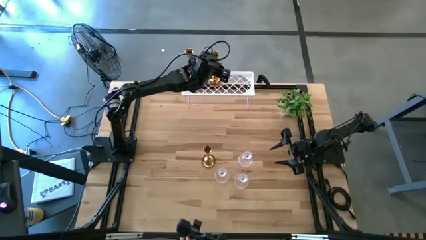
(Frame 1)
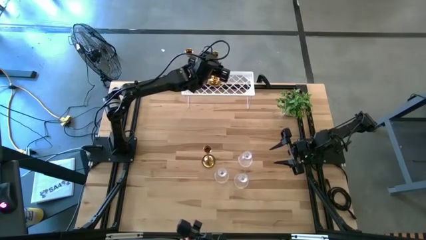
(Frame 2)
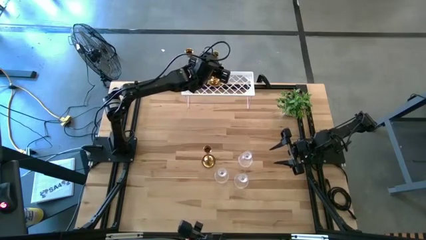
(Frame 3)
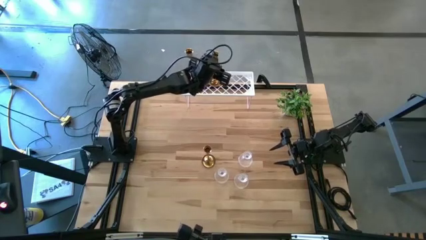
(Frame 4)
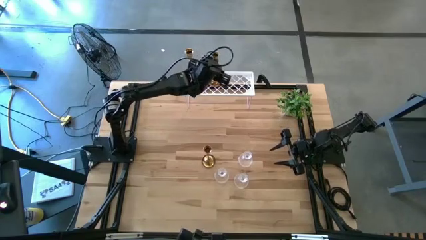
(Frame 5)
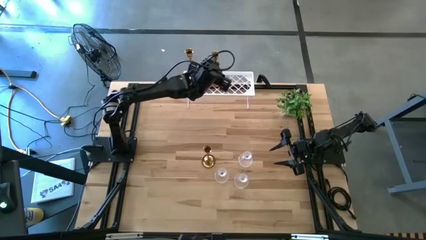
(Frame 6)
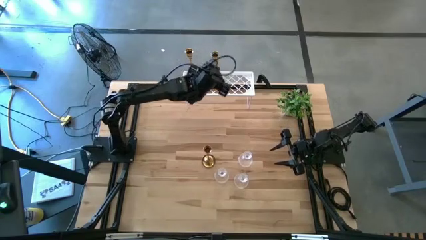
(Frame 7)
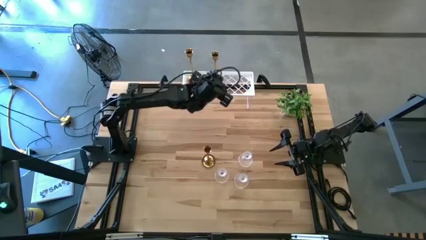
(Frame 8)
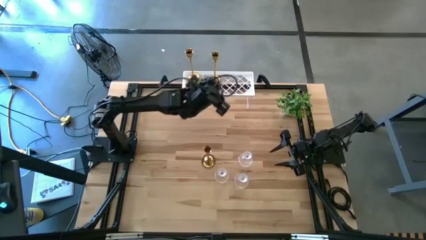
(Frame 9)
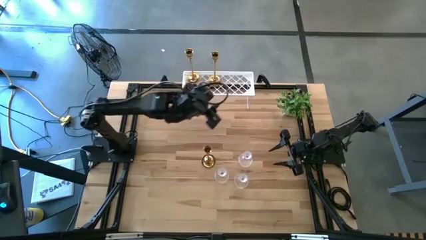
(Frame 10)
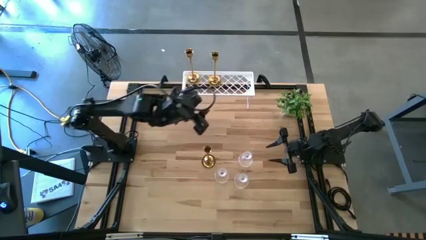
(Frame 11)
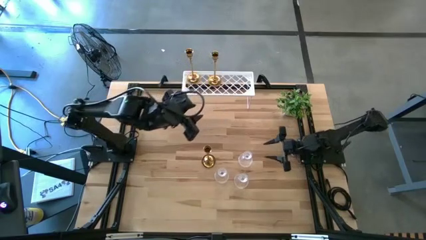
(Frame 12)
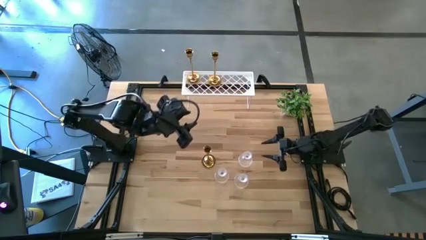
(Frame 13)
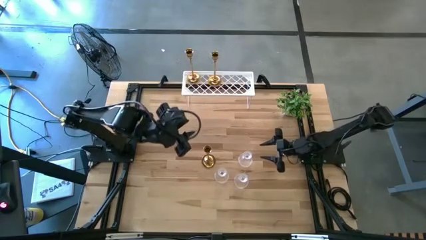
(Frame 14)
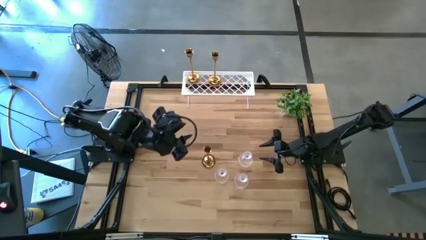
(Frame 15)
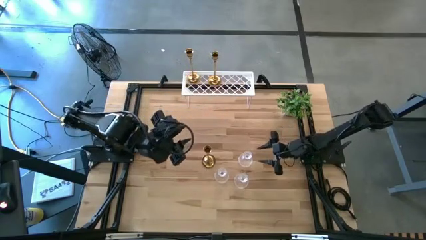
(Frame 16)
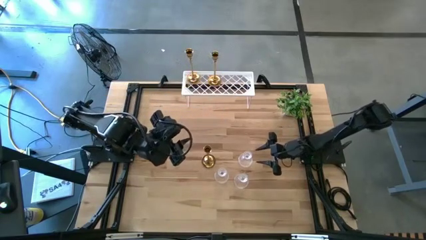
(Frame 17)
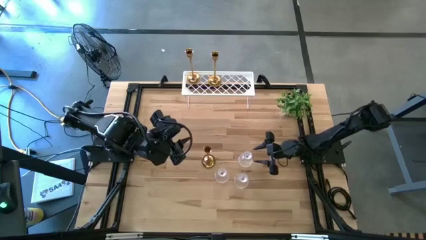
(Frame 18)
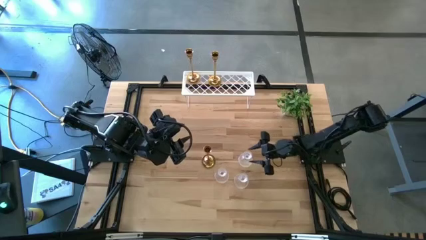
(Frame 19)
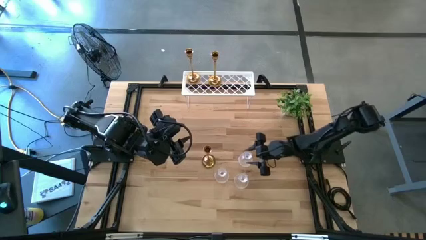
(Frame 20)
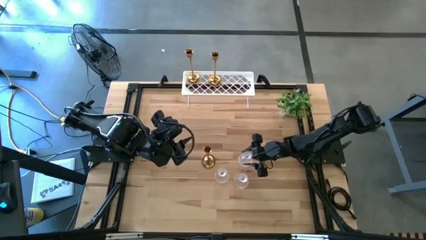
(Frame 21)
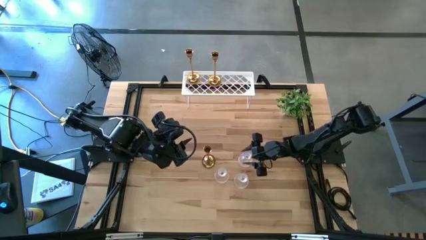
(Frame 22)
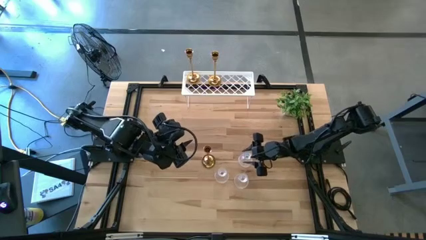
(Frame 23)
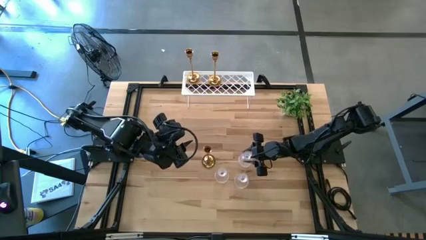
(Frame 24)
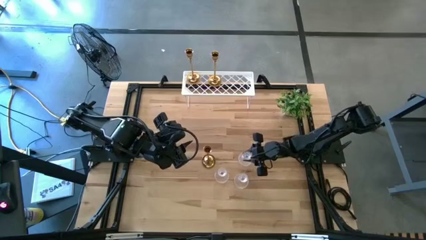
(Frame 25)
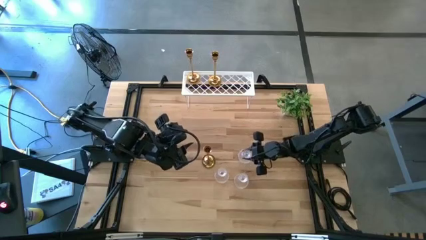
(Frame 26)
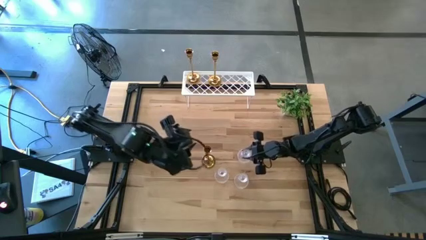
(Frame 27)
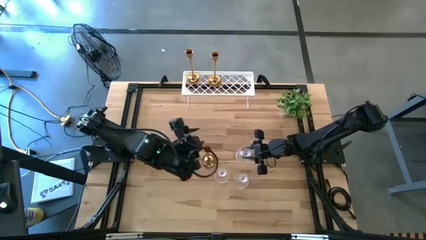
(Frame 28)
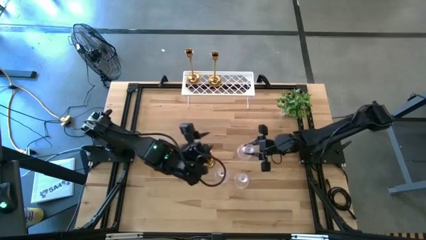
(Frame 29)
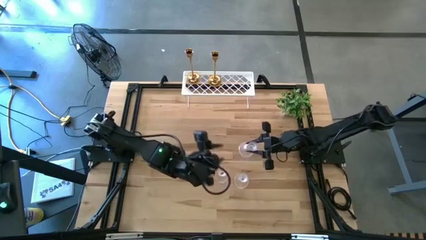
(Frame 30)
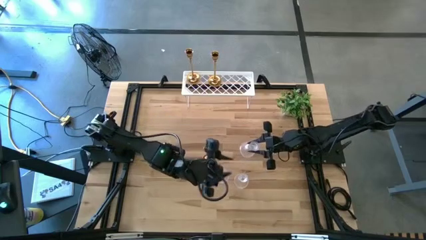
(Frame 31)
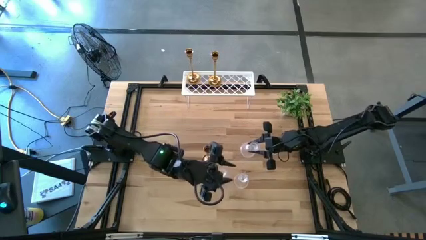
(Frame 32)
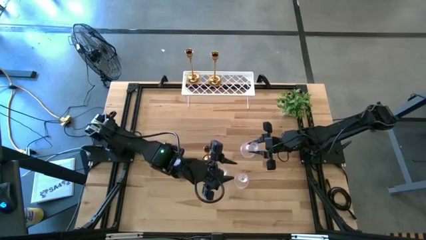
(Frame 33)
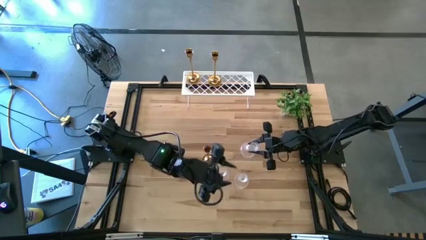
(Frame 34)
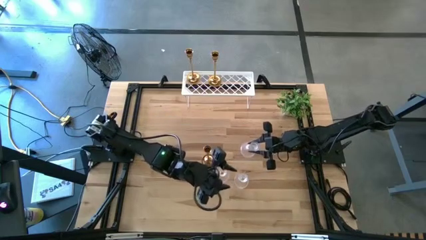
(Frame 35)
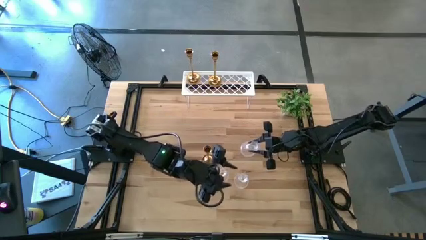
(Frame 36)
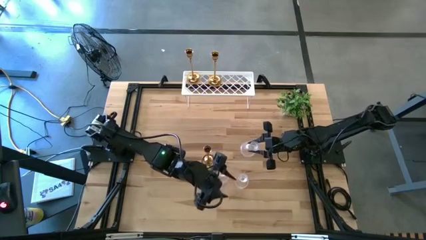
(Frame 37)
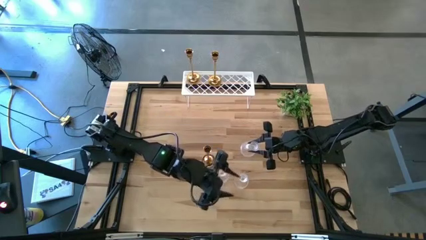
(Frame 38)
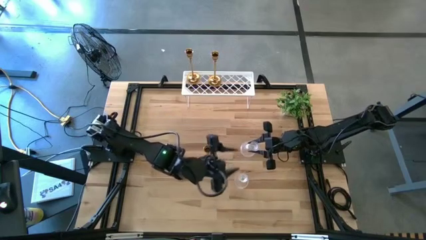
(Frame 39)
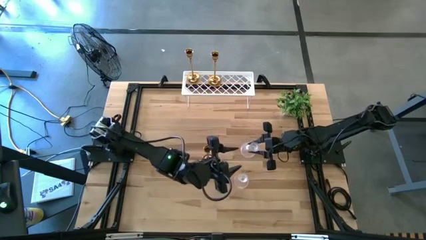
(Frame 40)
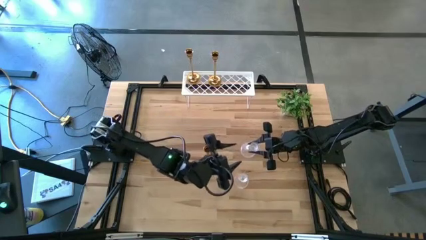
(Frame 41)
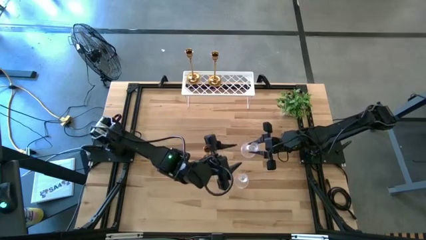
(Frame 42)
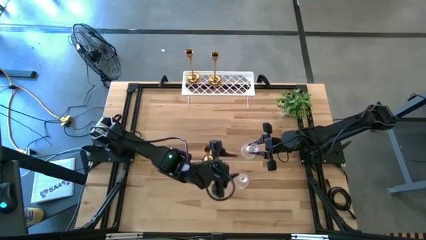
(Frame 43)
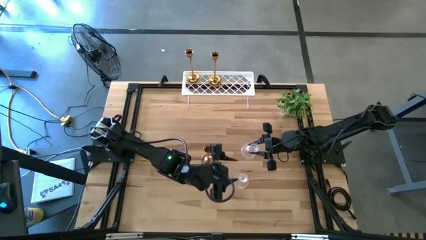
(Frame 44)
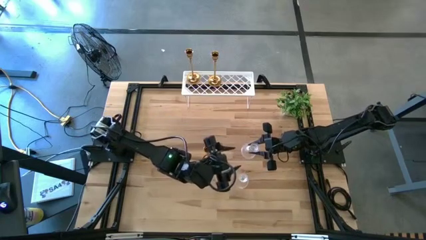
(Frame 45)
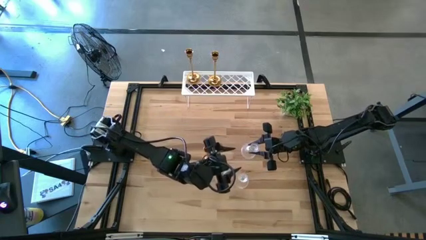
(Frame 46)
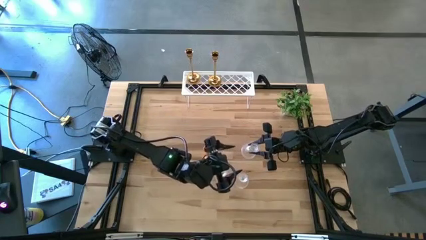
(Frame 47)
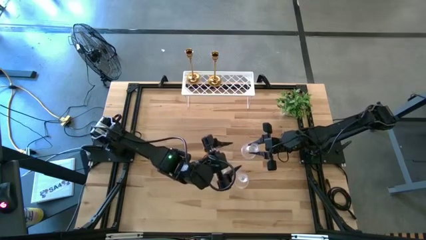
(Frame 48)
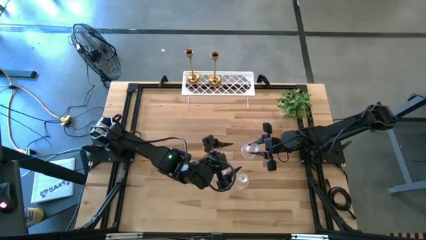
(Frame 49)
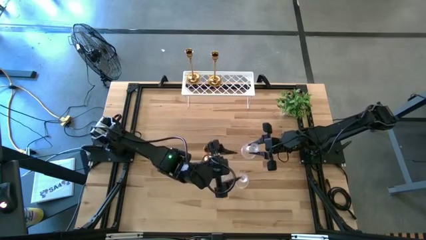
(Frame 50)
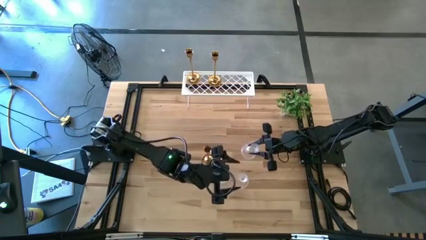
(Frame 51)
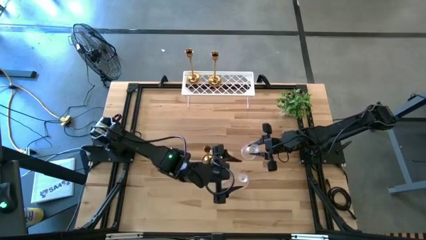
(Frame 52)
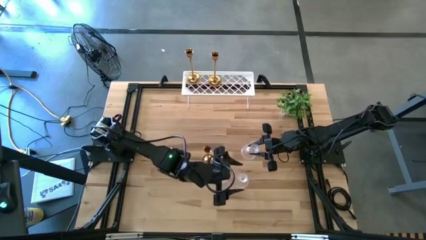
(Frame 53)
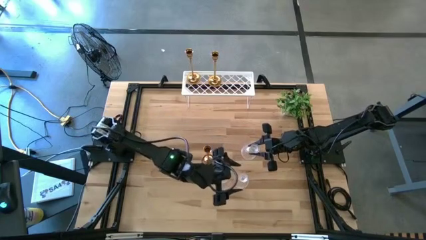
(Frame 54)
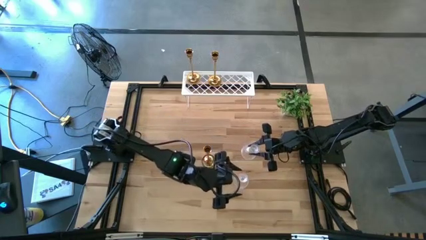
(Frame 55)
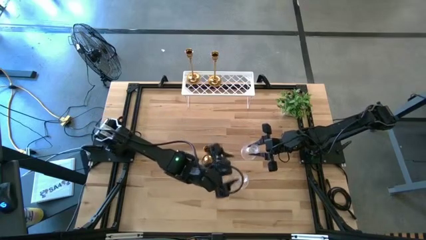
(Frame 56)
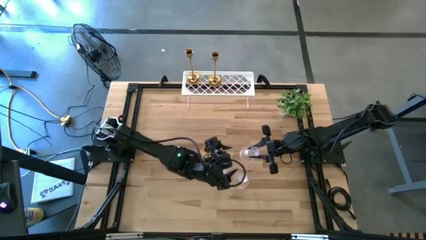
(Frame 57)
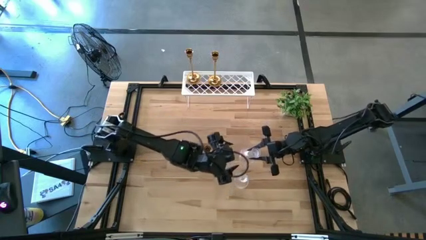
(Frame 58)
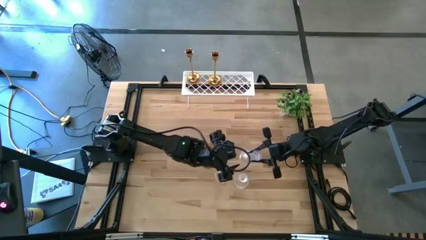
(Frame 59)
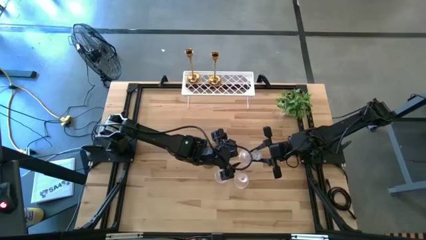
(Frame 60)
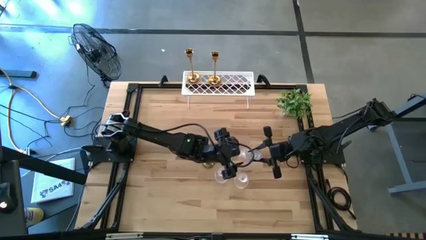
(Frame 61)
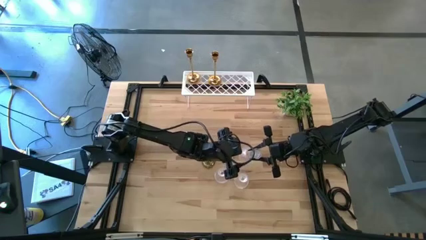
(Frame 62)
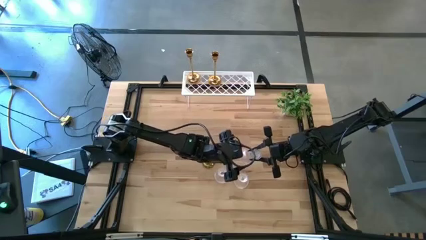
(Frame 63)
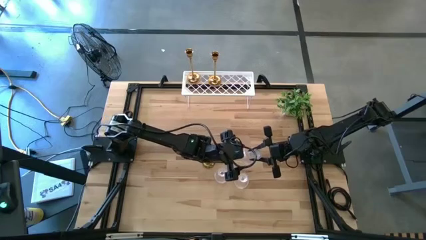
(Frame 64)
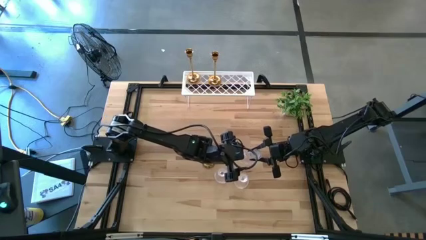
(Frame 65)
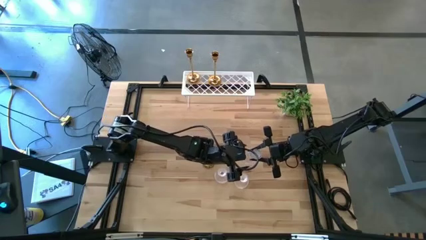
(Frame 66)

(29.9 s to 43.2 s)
Task: Pick & Place candle stick holders
Put the top glass candle holder on the shelf
